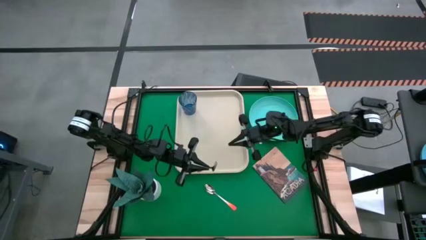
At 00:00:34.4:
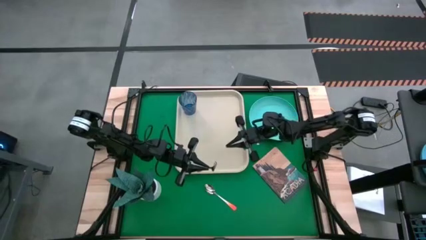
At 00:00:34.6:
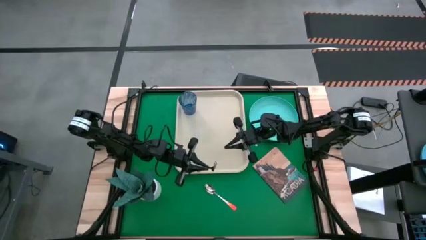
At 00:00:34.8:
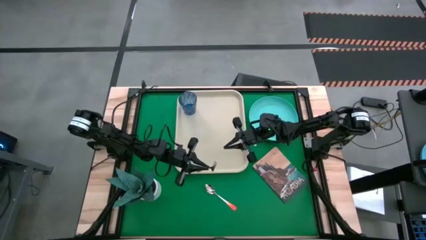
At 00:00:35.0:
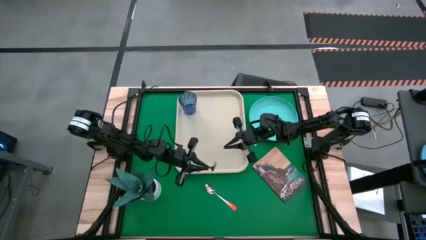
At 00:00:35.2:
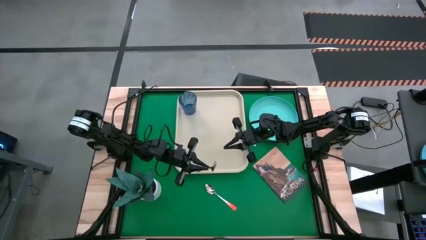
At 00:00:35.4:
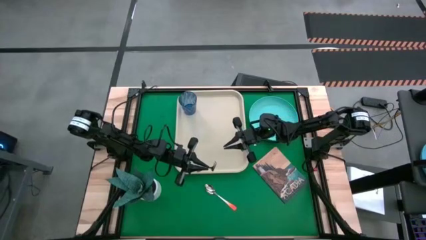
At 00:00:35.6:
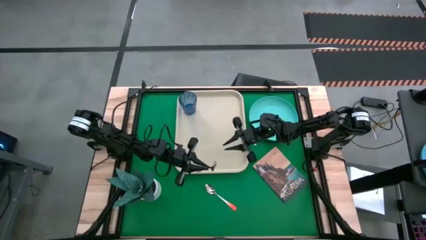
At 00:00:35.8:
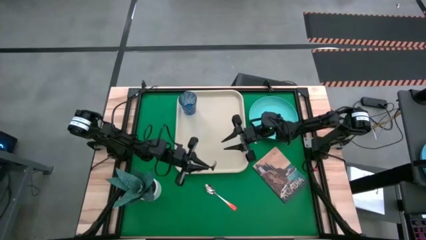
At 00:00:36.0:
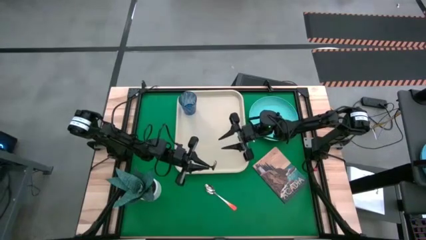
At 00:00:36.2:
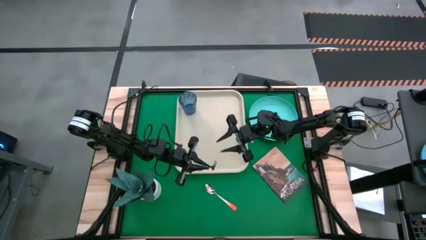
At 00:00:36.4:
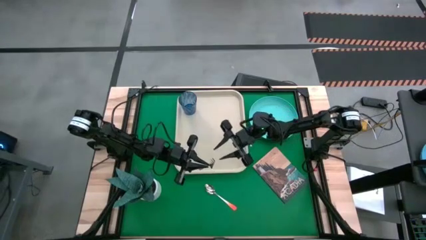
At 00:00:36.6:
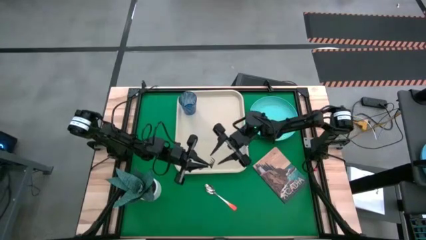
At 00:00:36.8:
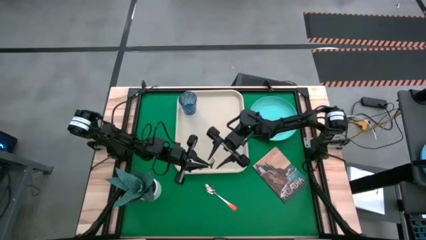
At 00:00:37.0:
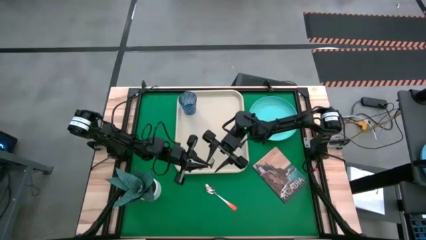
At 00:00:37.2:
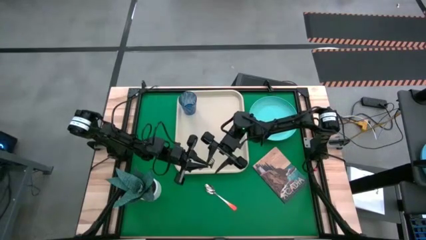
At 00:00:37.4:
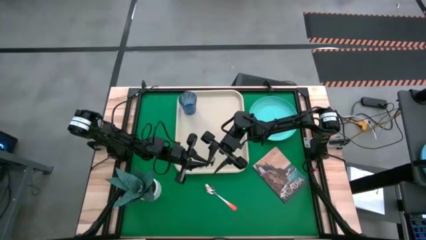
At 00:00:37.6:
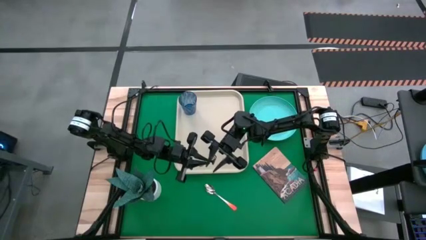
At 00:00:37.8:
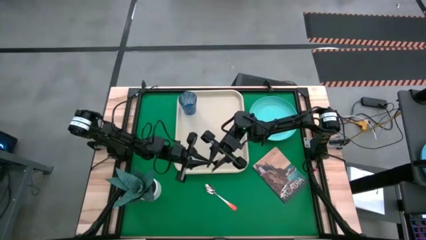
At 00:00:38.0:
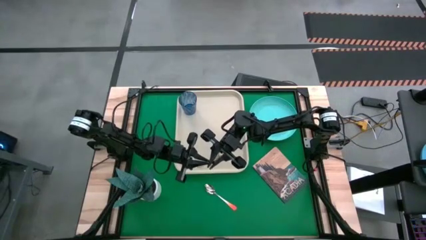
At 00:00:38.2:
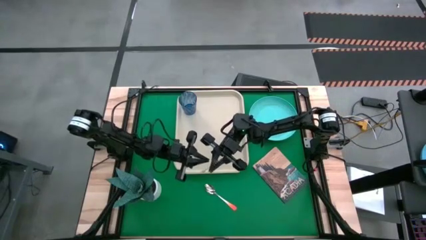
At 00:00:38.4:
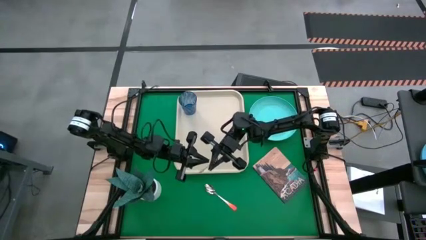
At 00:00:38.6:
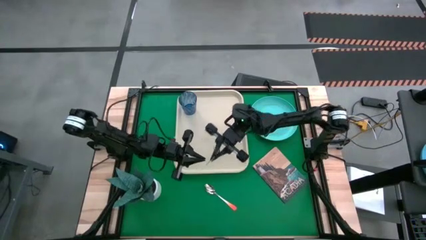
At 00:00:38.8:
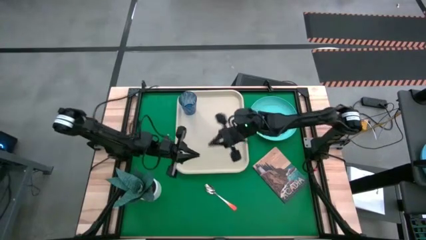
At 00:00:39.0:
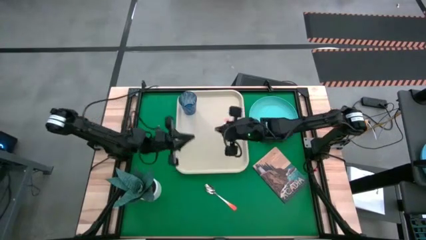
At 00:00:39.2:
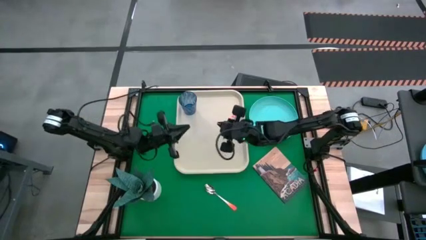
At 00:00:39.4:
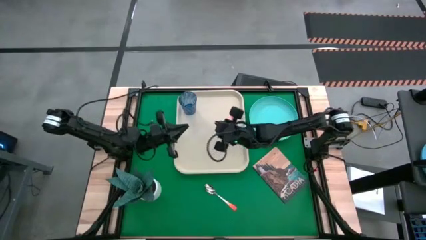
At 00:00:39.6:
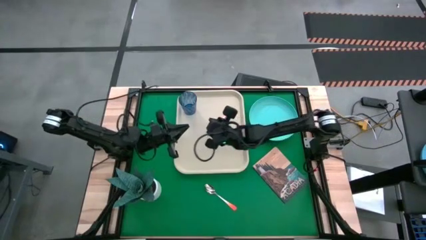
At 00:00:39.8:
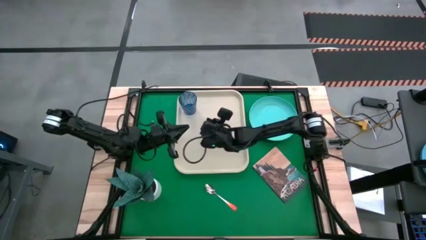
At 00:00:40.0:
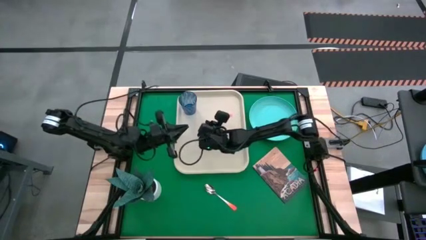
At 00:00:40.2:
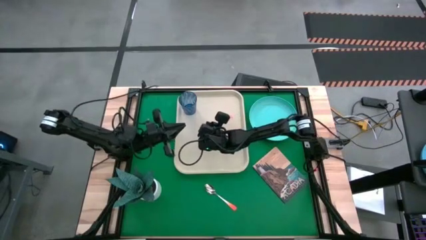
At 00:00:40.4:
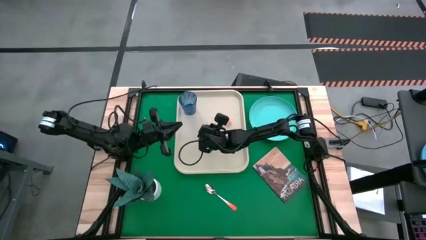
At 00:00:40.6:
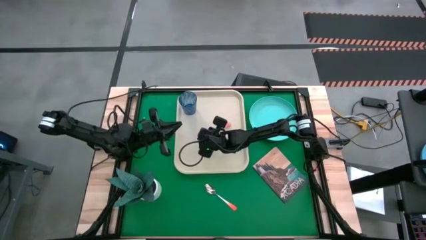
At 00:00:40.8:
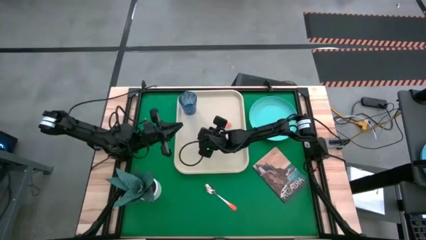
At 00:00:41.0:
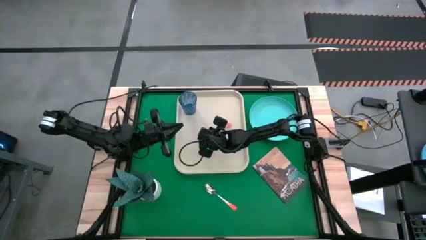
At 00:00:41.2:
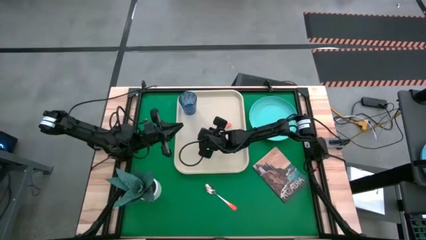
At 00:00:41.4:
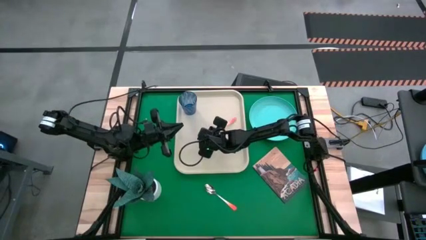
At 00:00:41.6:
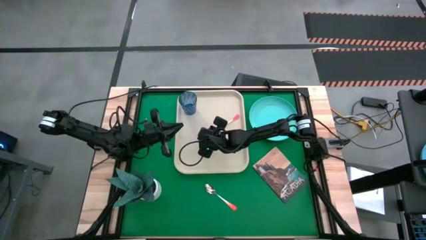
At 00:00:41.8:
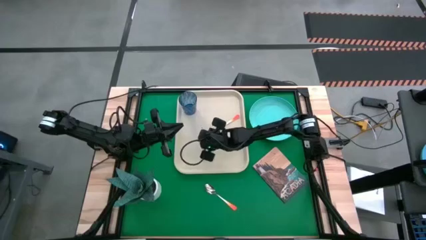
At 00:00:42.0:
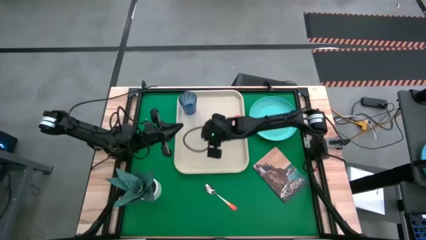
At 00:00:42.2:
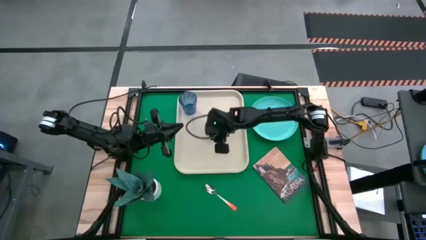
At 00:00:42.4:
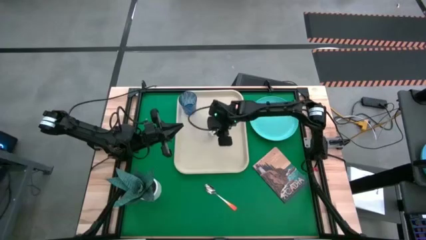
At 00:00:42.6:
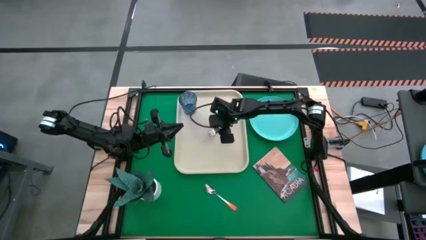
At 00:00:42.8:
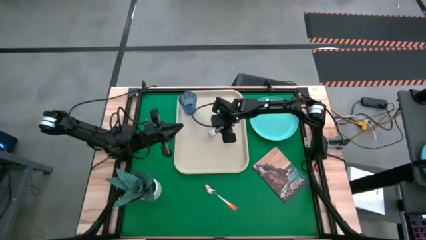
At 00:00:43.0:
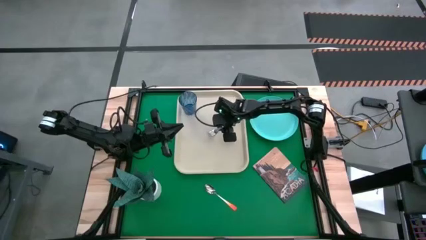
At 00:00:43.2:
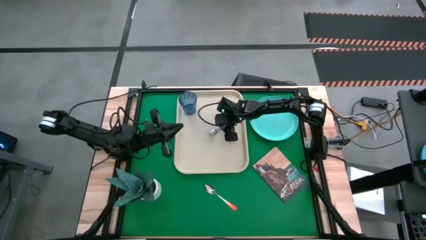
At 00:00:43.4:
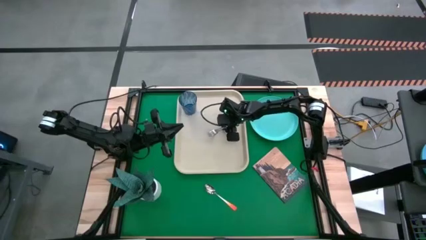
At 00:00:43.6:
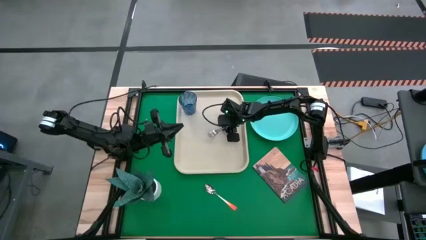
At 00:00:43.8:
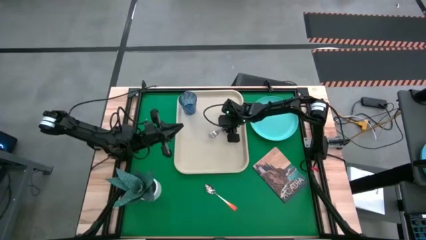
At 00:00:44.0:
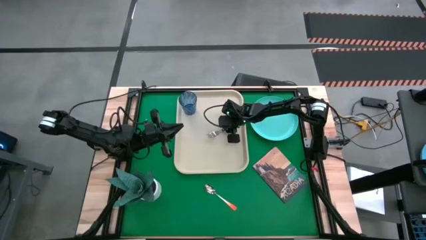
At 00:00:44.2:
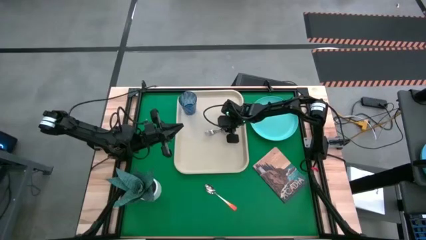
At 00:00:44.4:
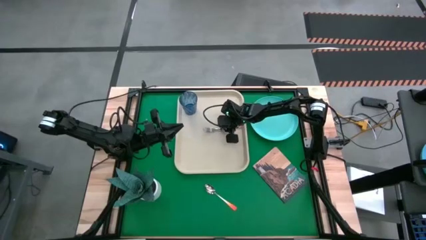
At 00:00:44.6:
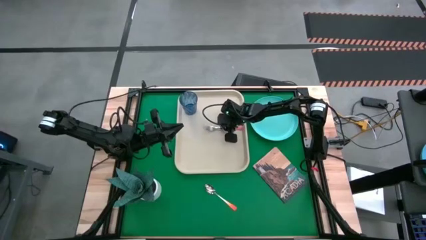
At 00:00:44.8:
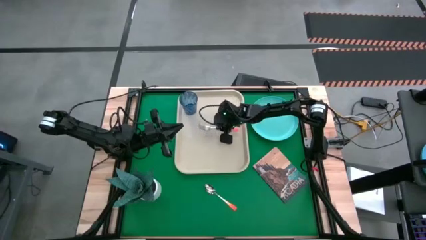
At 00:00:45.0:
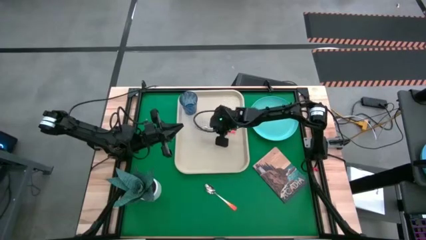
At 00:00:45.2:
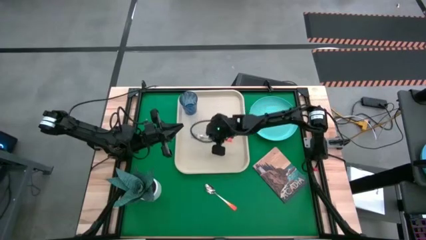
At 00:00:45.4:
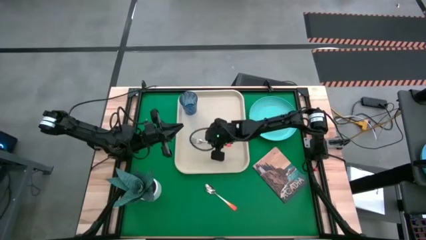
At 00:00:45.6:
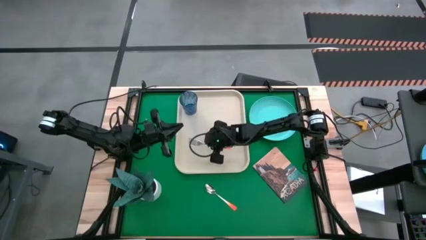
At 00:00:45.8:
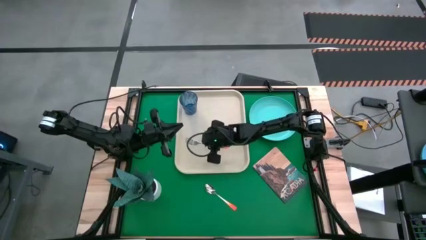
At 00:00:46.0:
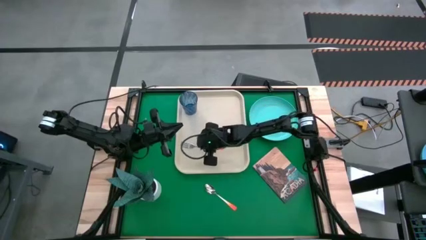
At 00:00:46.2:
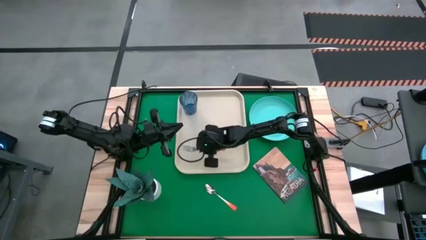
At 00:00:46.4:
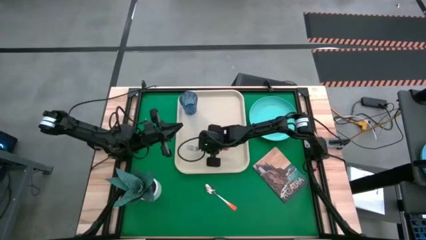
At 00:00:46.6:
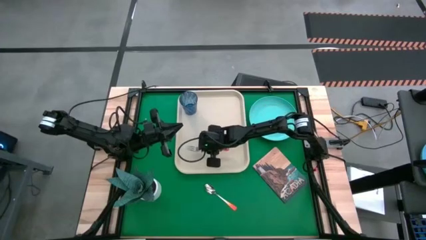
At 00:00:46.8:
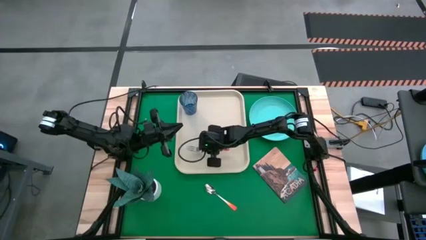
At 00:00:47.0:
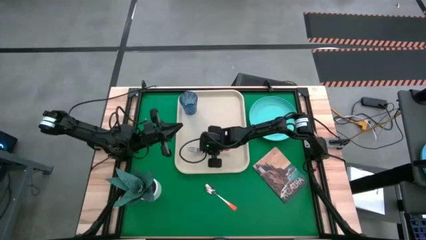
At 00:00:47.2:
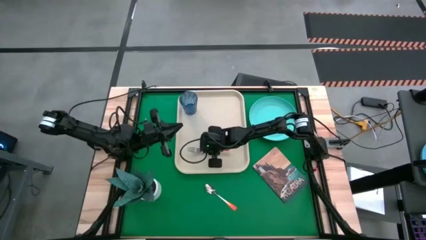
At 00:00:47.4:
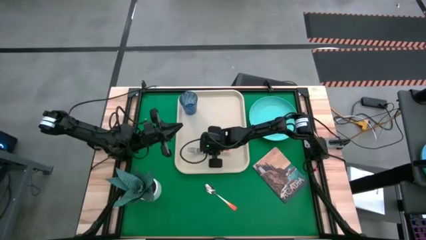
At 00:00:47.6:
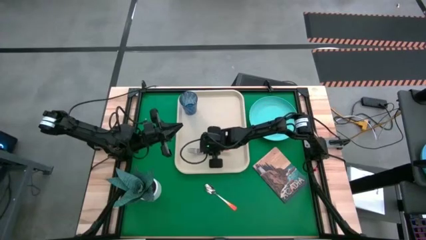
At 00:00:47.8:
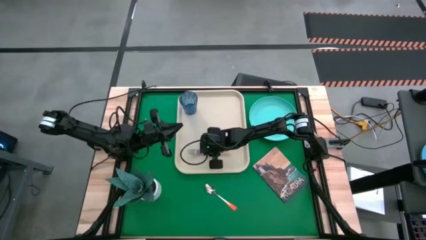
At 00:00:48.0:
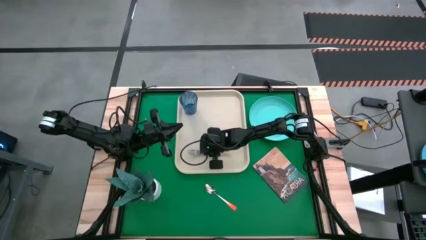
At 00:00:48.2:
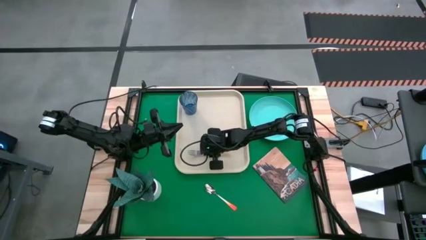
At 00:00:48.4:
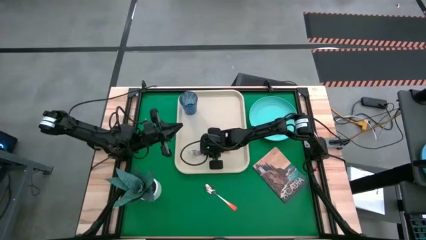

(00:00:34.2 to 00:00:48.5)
Task: Pick and place plate/cup/fork/spoon on tray
Put the orange fork on the left of the white serving tray
